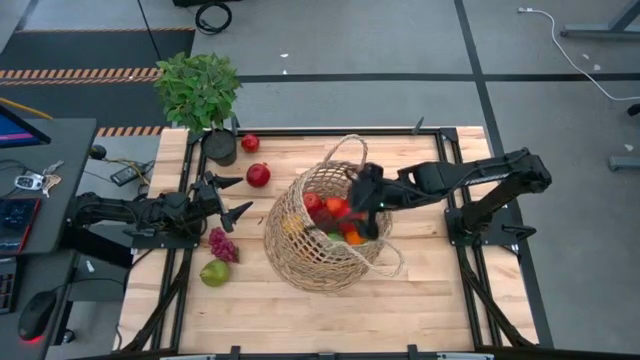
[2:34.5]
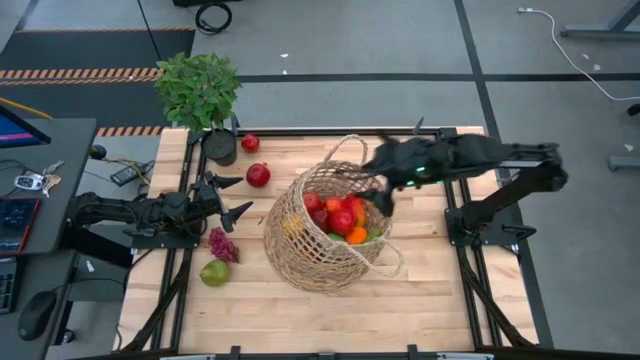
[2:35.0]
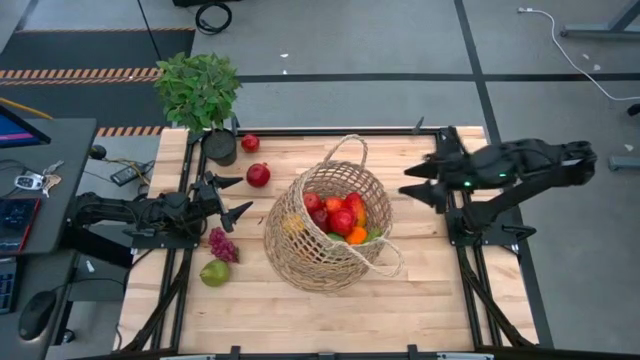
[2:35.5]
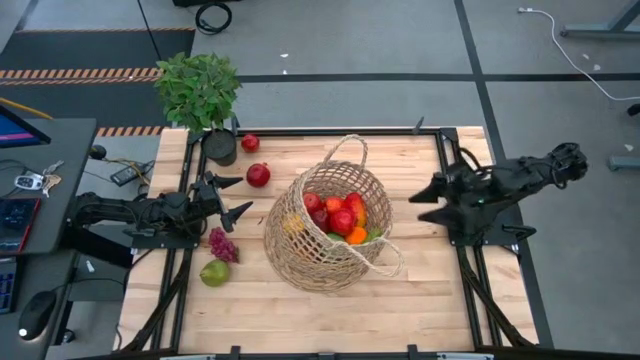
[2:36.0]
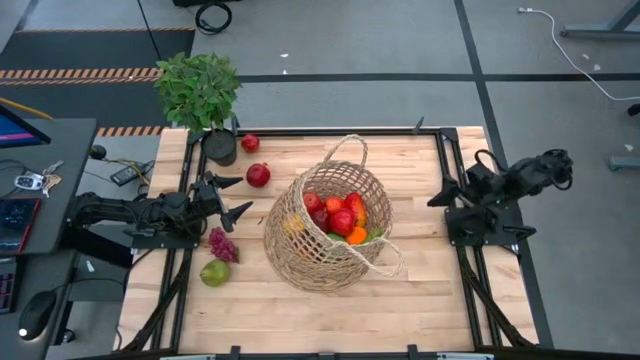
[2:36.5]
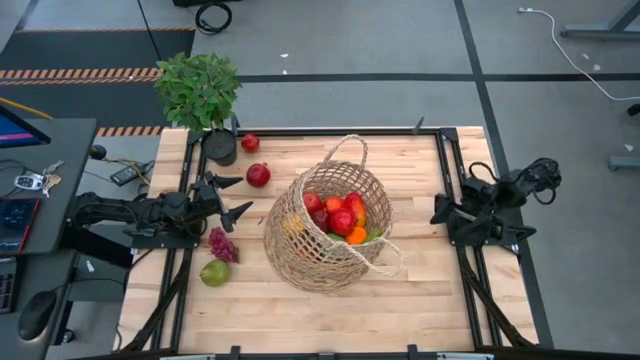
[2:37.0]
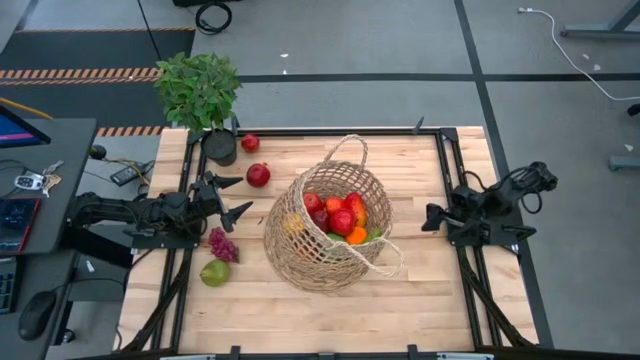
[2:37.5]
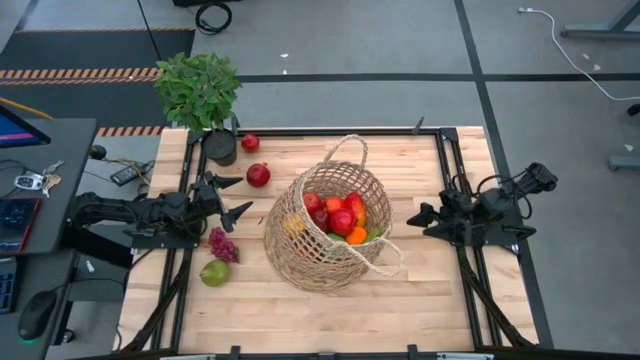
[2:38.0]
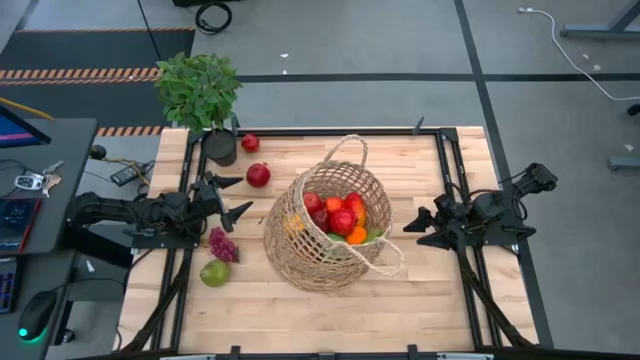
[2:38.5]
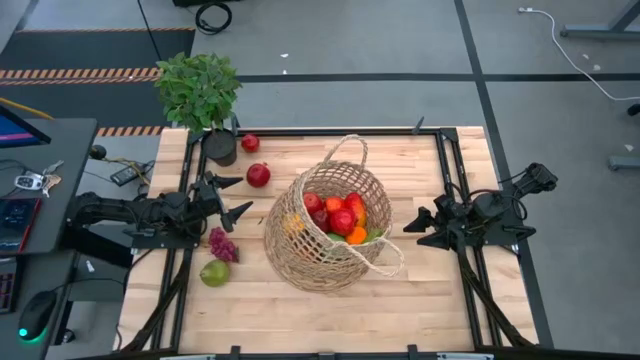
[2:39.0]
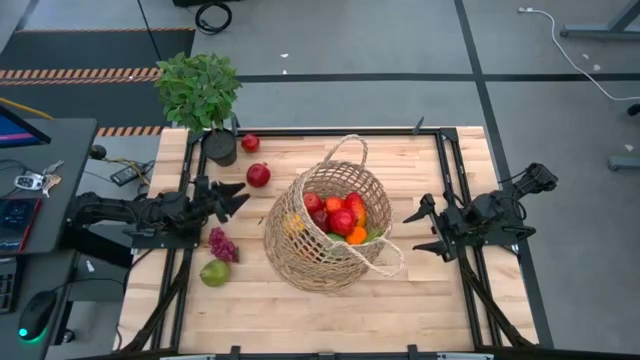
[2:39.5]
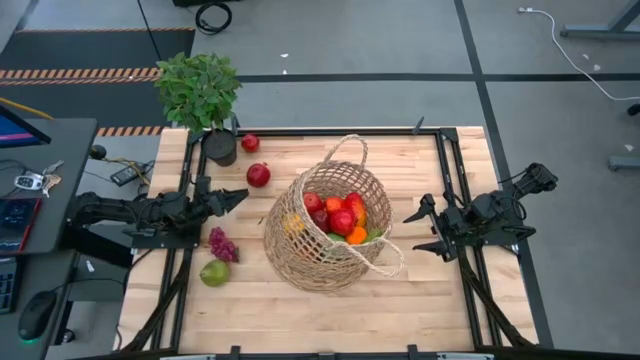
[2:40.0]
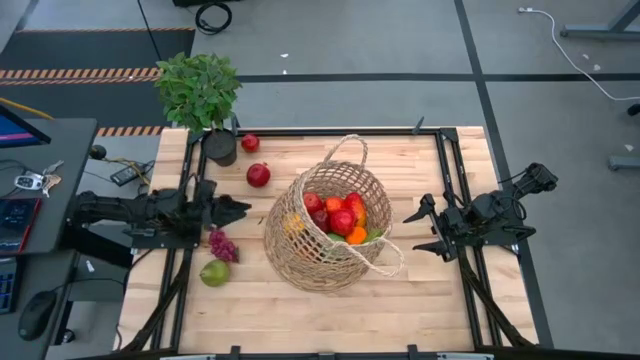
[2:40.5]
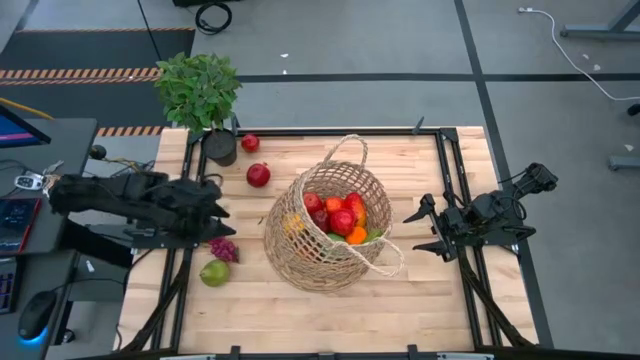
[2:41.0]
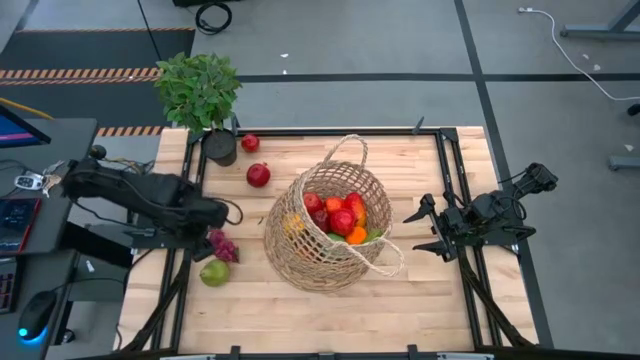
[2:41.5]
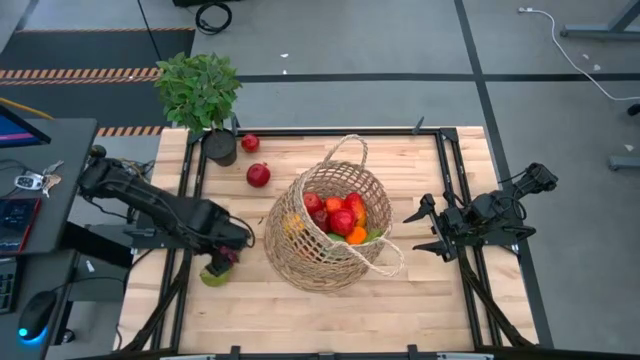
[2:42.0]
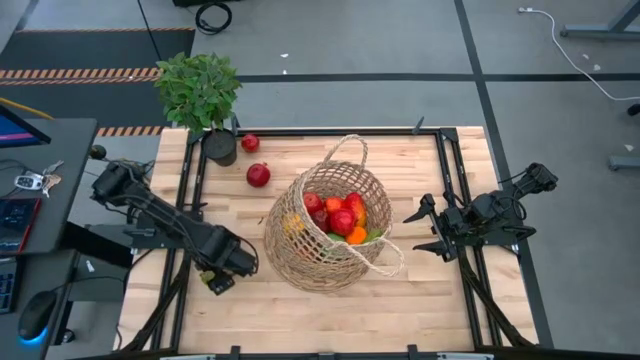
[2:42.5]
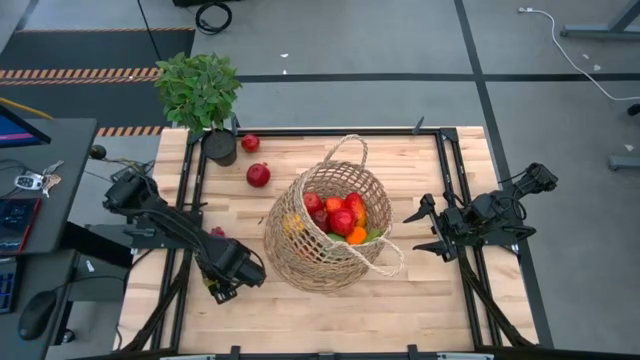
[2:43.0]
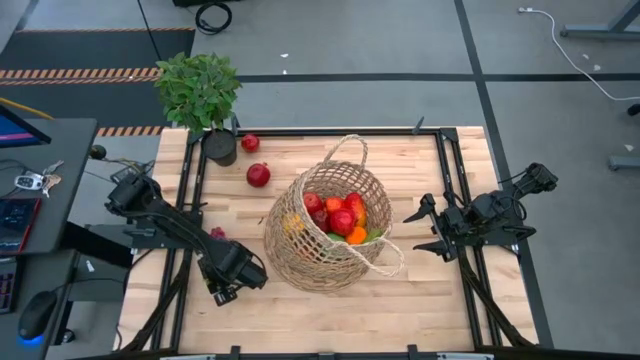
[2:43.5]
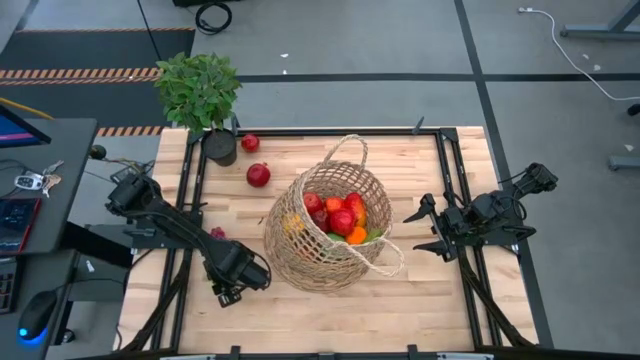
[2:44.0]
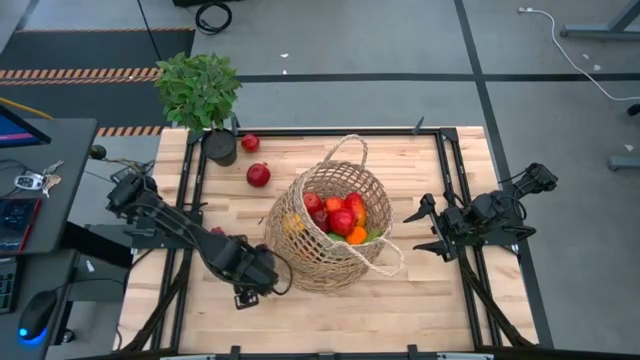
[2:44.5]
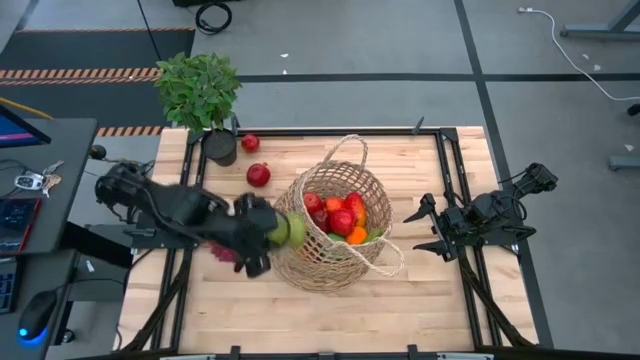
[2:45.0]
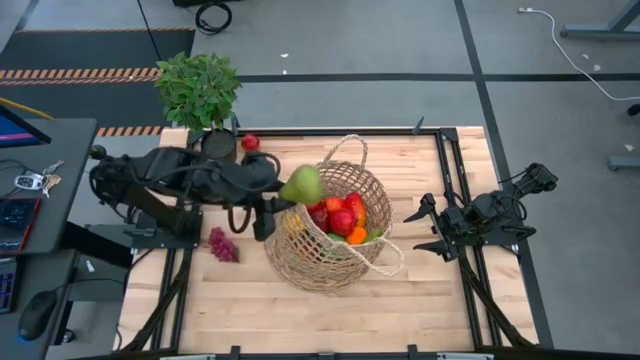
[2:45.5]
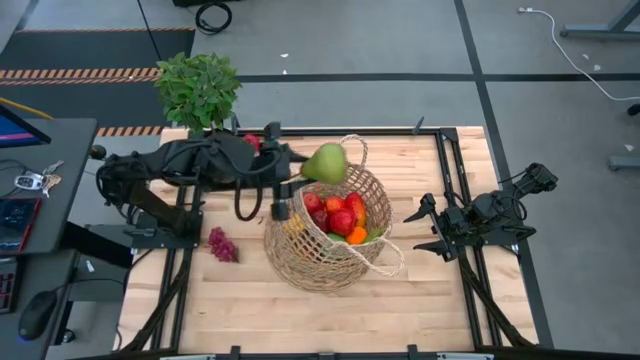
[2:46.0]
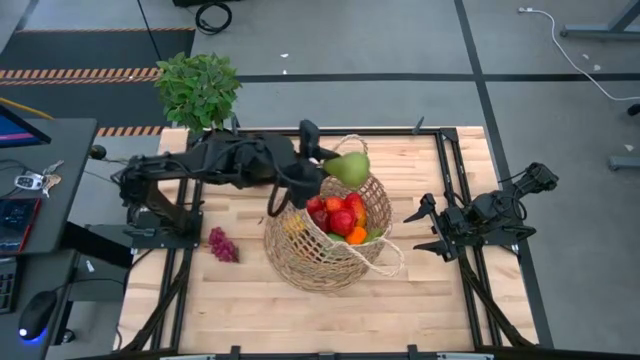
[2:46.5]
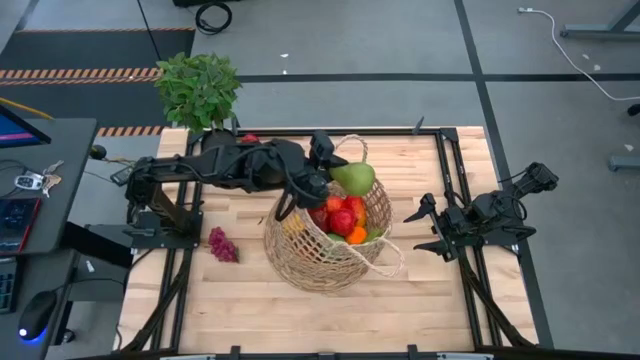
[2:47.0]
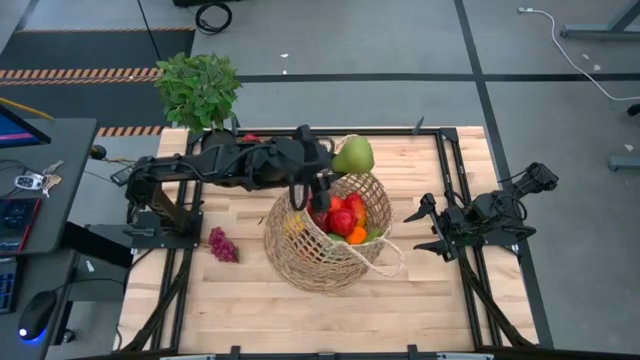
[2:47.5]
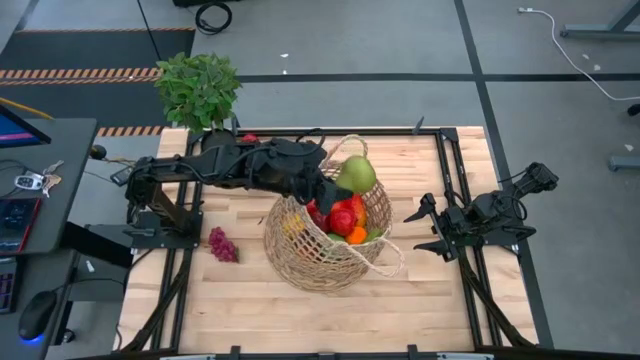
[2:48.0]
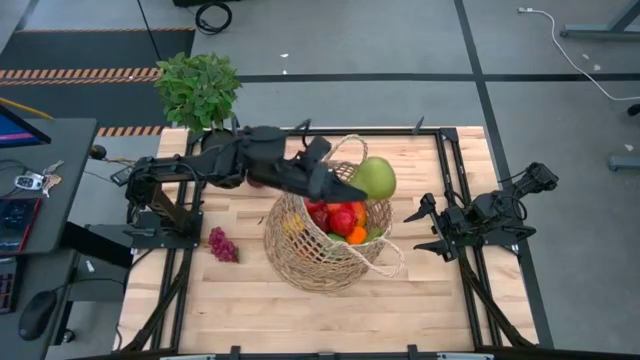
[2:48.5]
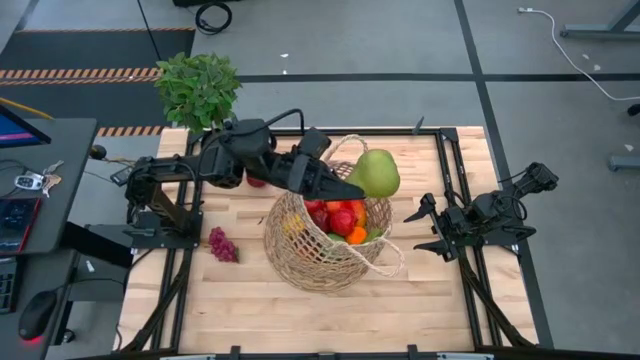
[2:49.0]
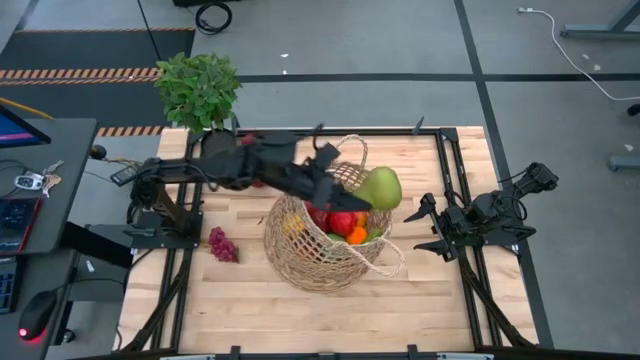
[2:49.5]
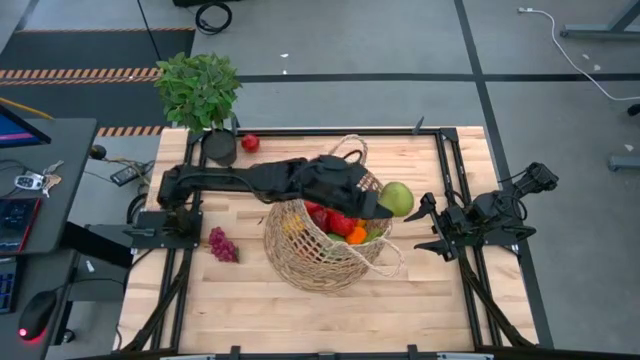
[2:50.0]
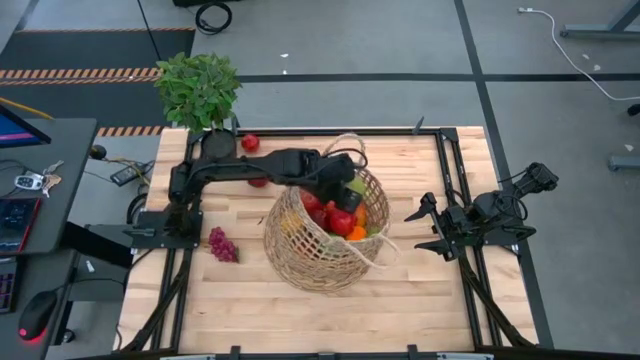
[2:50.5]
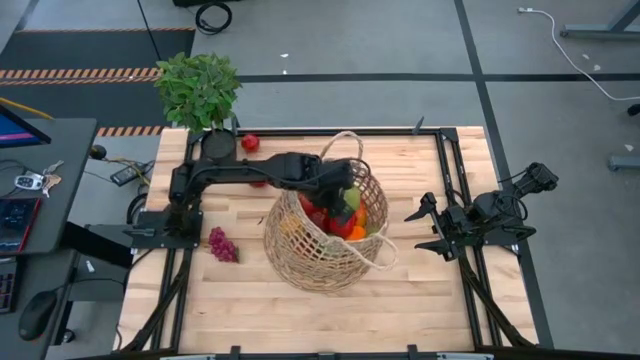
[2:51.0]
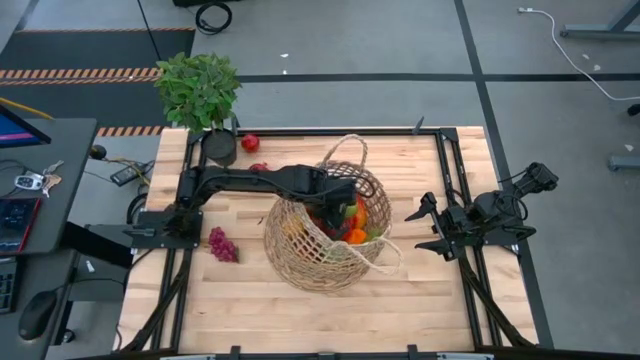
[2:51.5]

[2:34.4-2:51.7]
Task: Build produce basket
Put the green pear into the brown basket

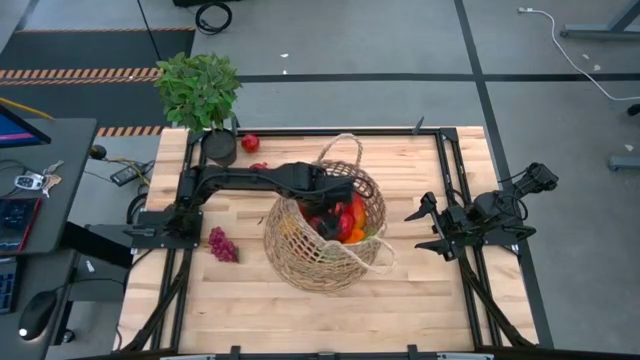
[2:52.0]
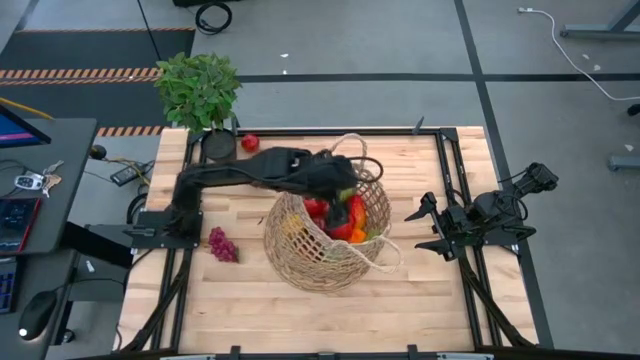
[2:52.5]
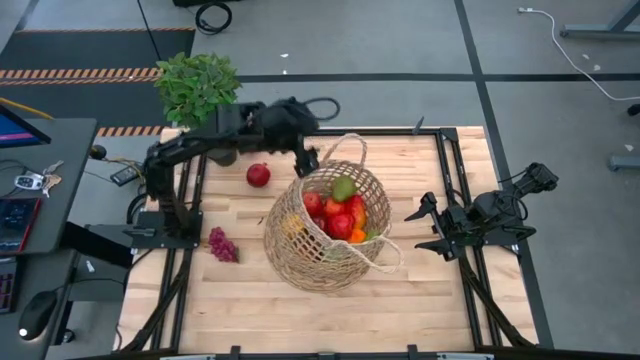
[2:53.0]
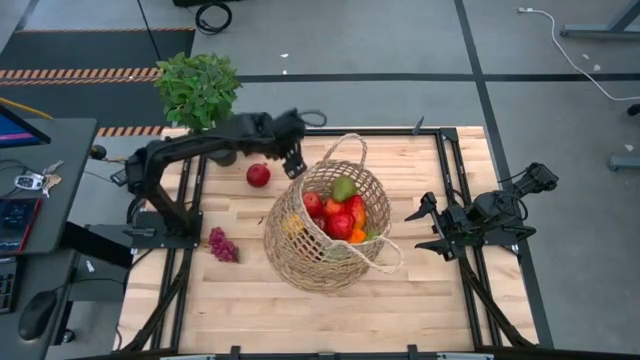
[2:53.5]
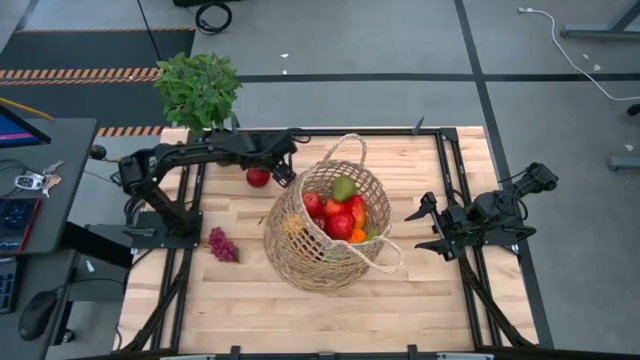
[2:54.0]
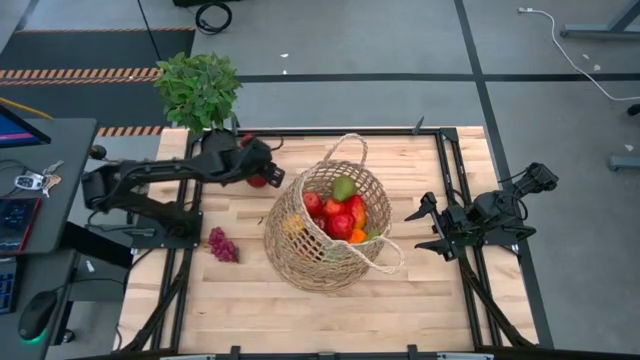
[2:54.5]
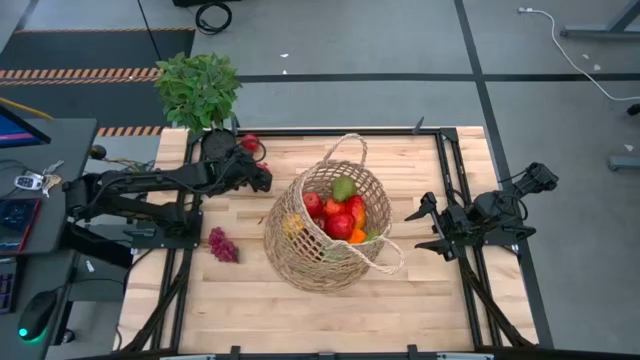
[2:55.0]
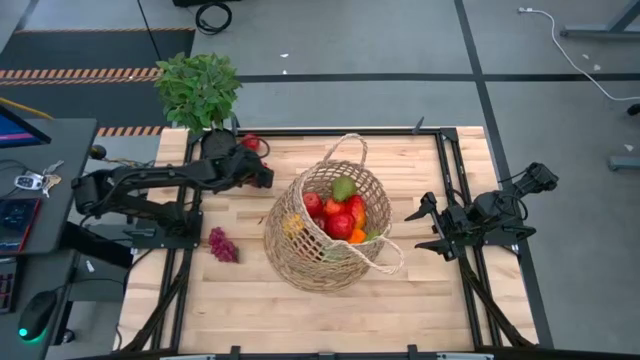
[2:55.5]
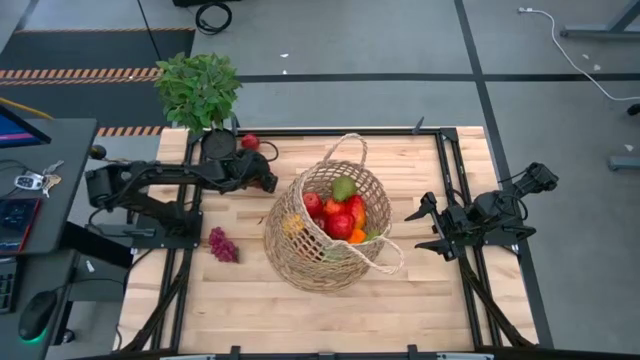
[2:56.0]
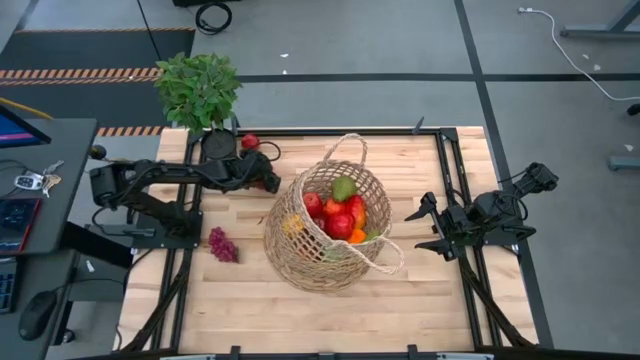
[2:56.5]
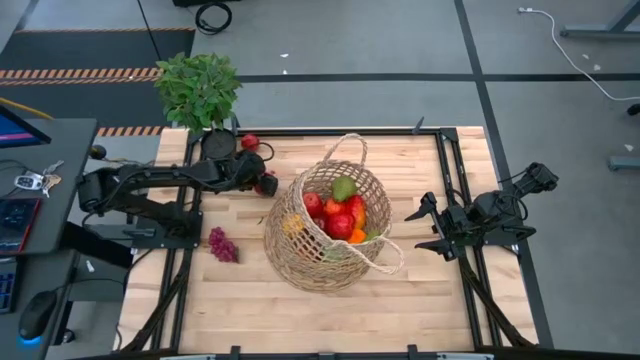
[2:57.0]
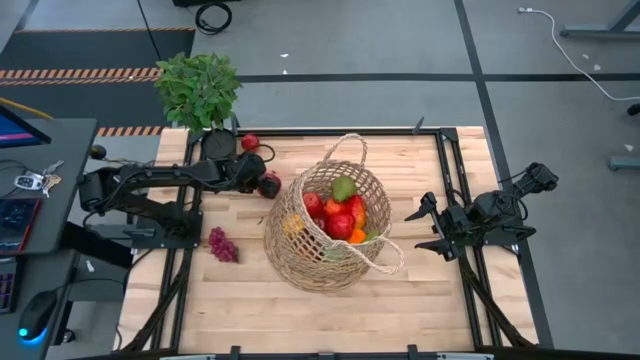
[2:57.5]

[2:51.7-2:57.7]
Put the red pomegranate into the brown basket
